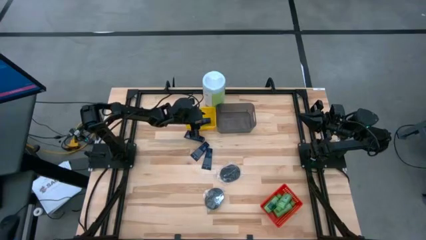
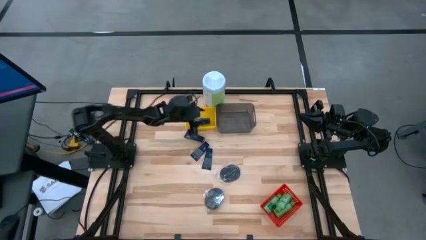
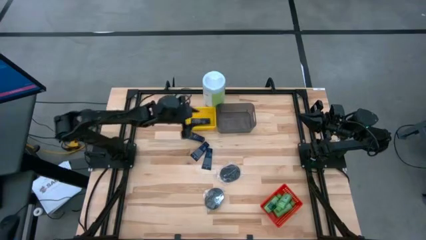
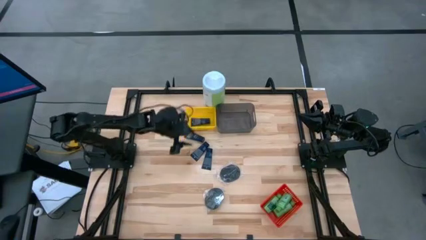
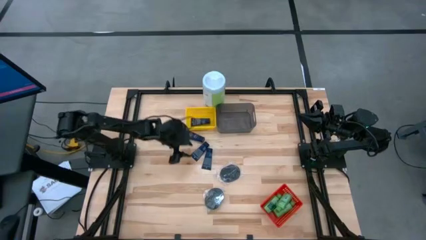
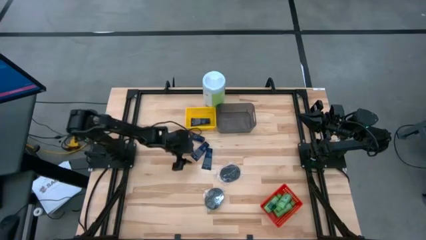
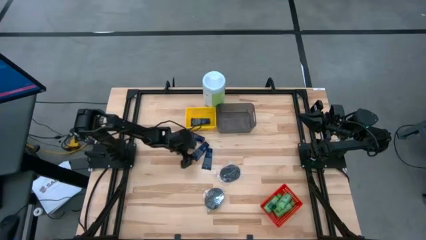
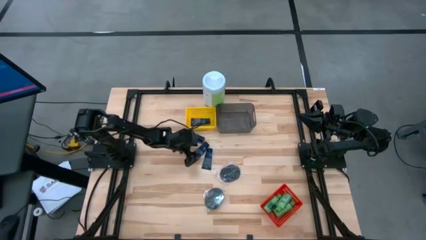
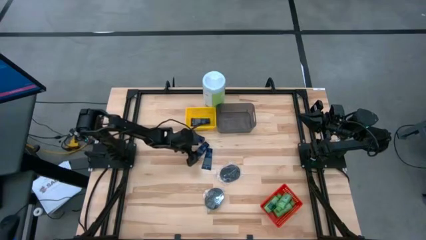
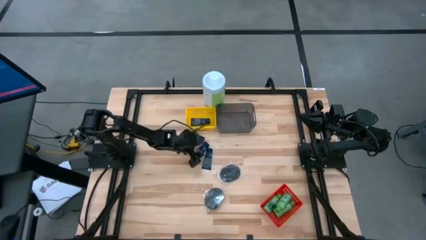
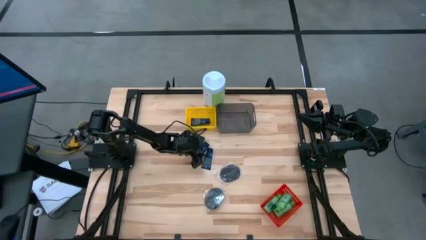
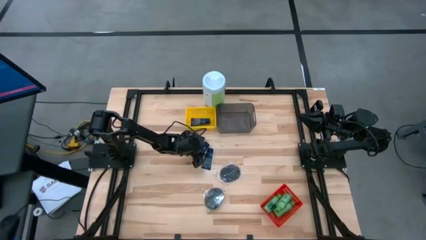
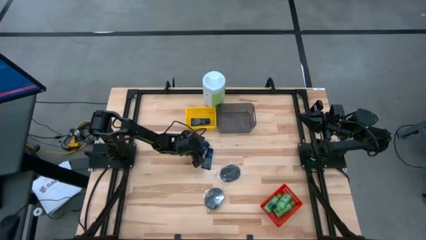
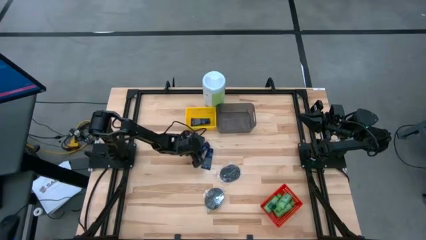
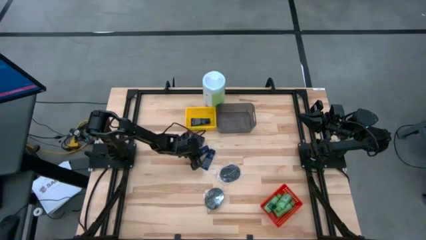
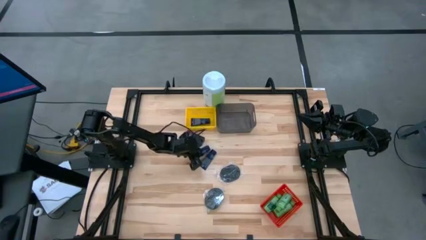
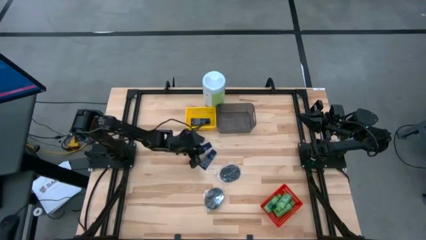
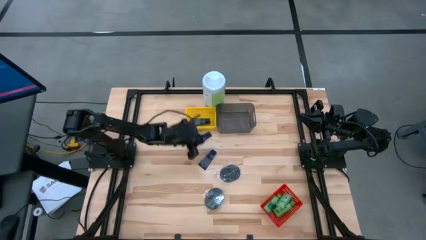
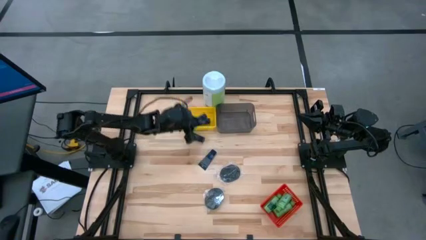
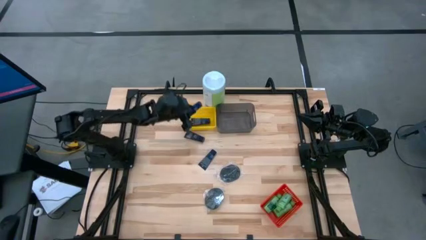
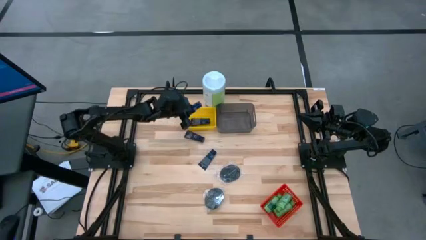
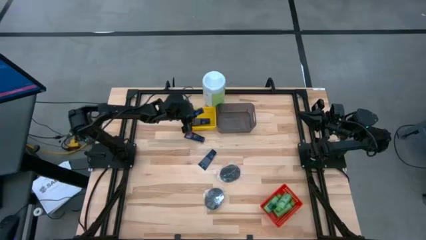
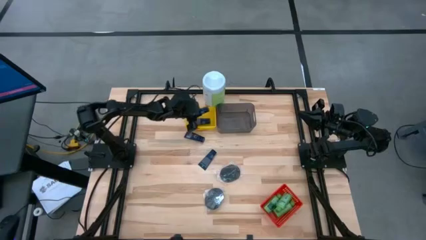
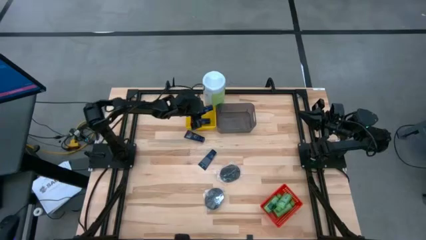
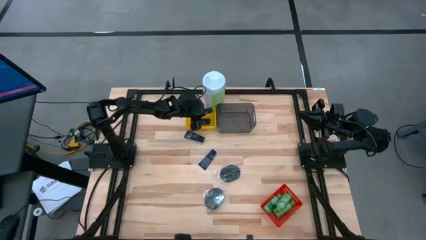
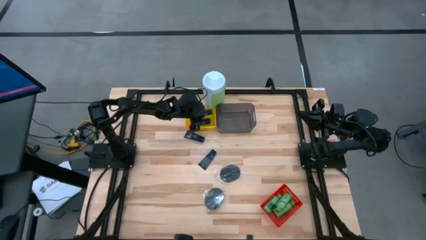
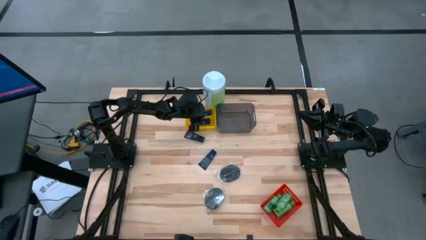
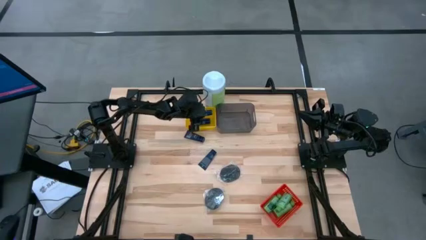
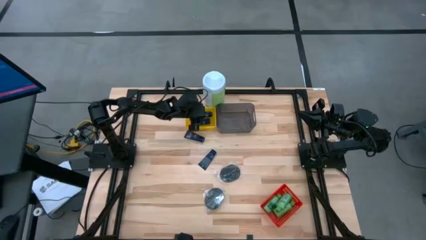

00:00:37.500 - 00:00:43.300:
Task: Pick & Place Travel size toiletries
Put the dark blue shaving cream into the yellow basket

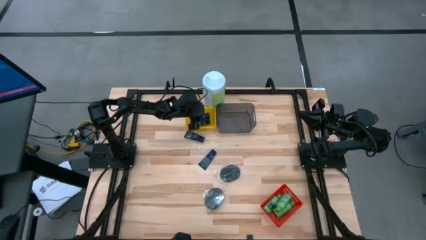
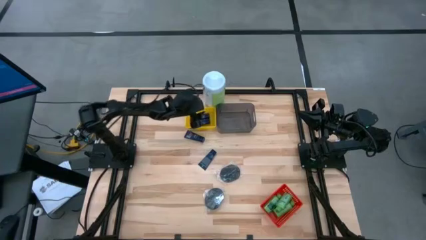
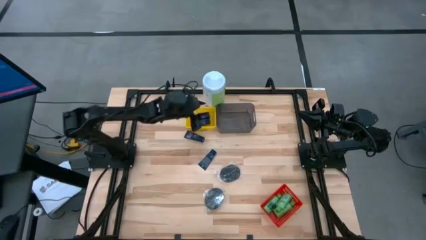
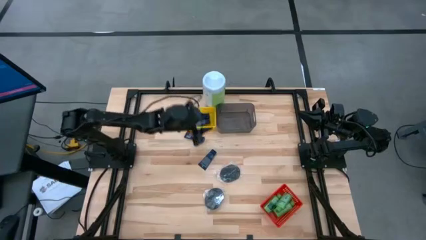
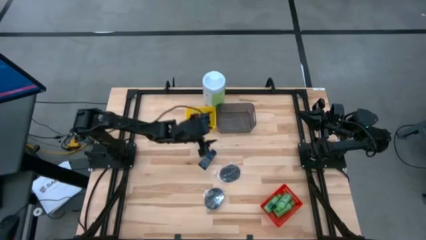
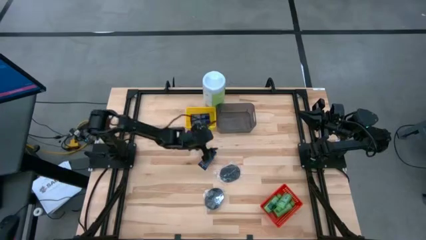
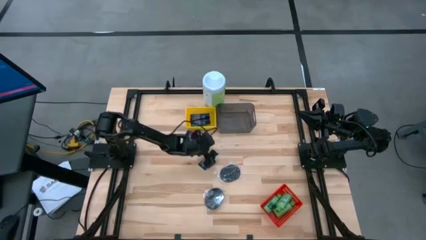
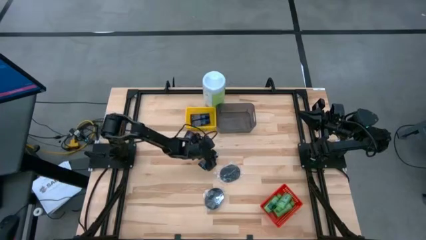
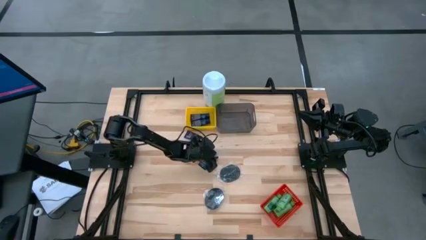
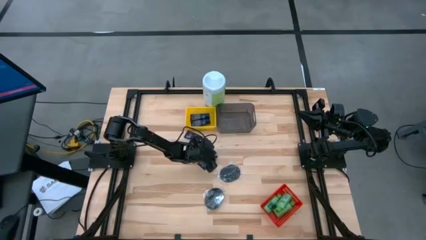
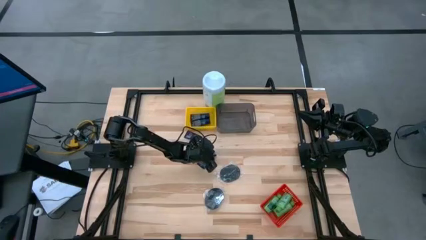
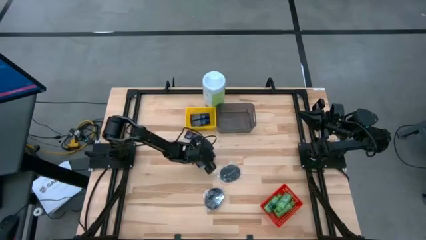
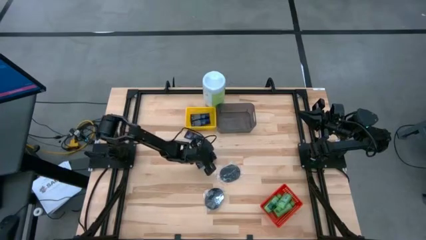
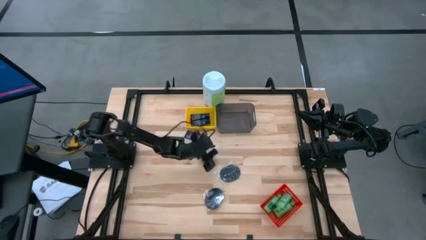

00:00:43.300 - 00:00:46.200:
Put the dark blue shaving cream into the yellow basket

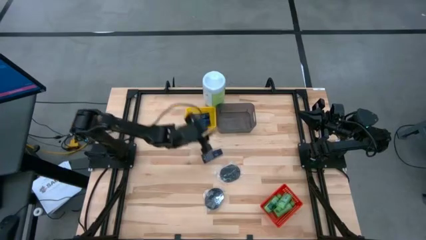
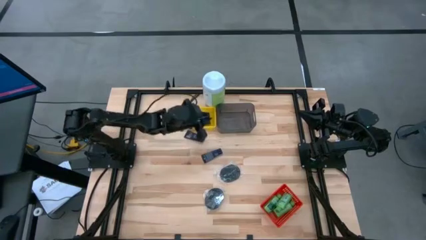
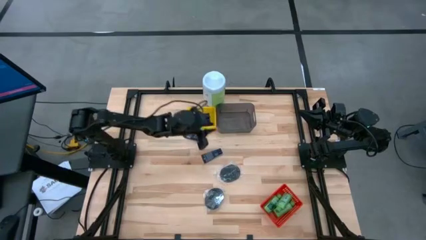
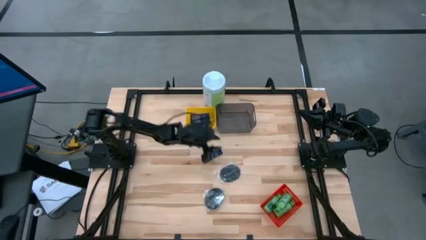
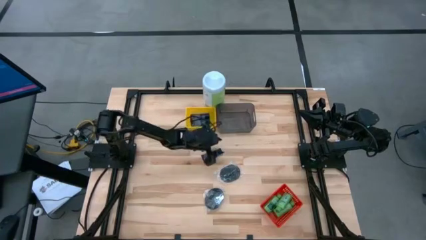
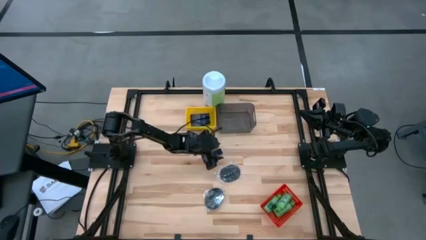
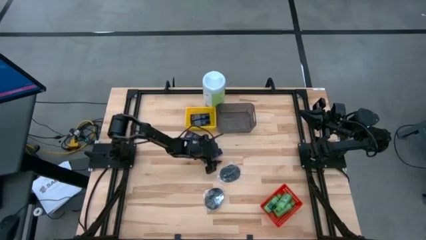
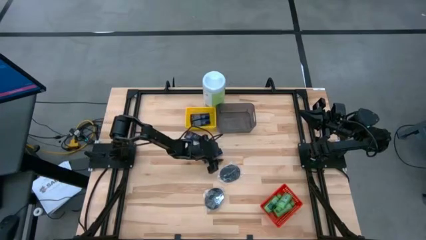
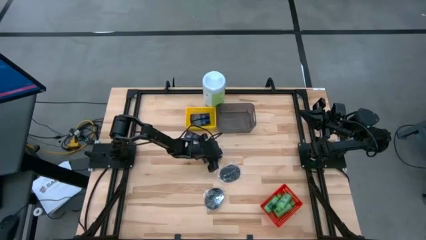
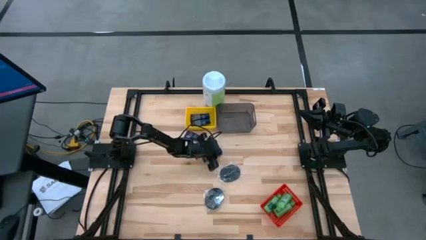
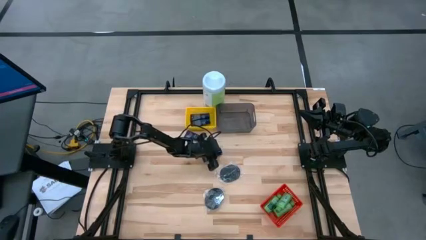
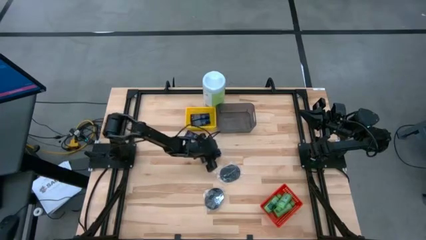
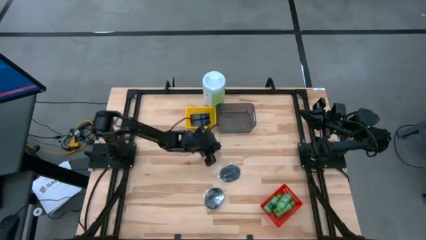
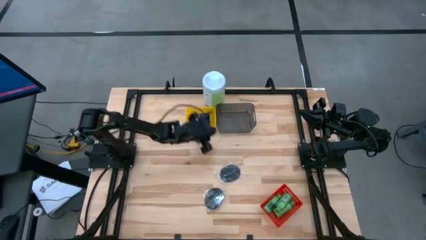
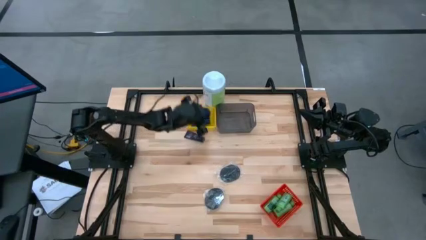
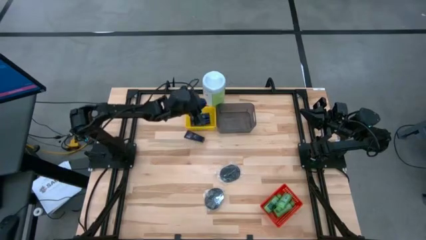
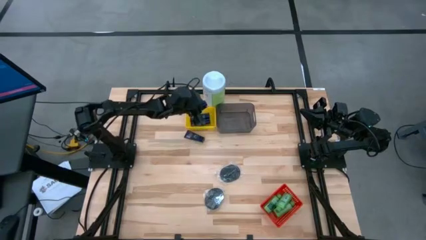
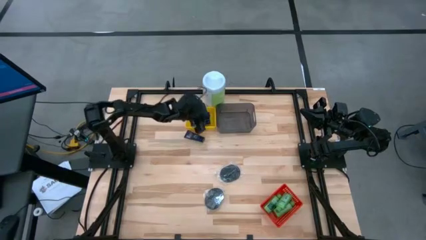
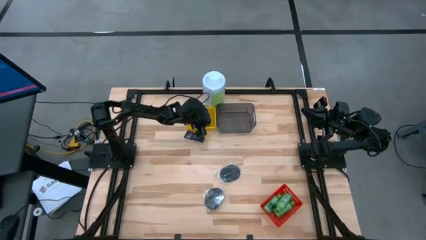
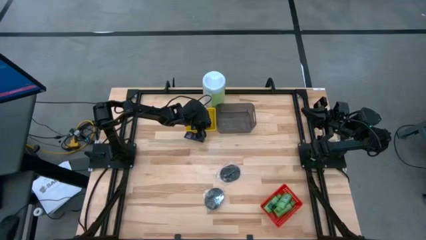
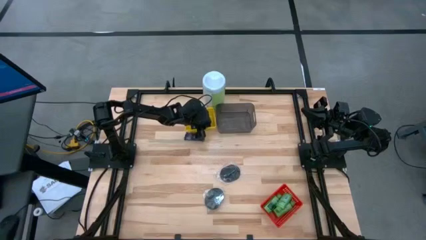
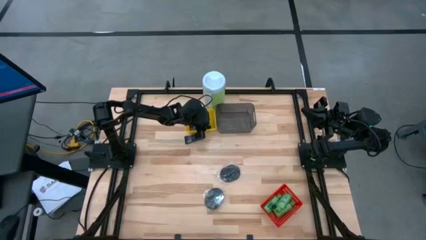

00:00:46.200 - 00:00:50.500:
Put the dark blue shaving cream into the yellow basket

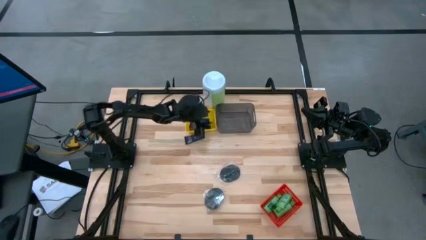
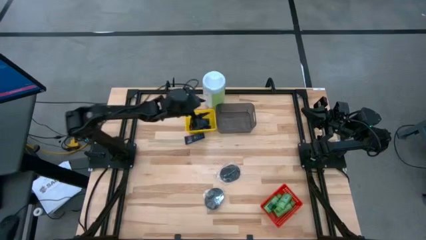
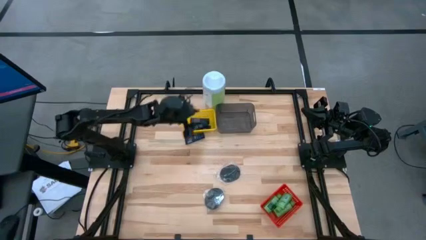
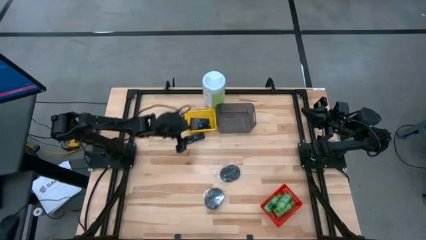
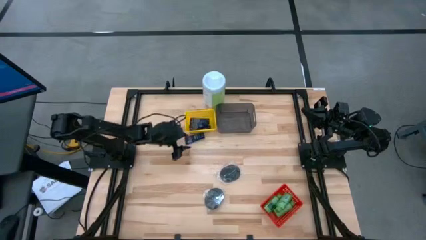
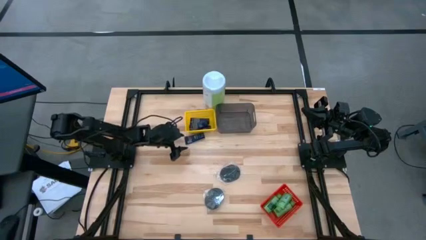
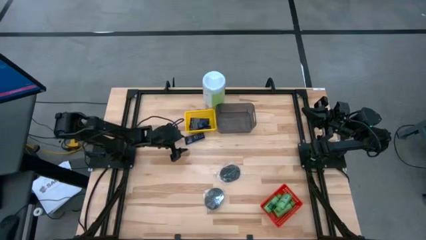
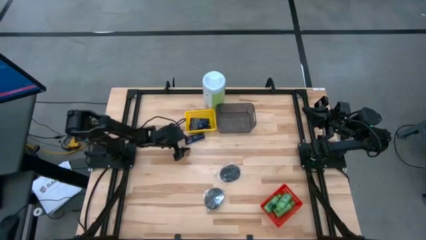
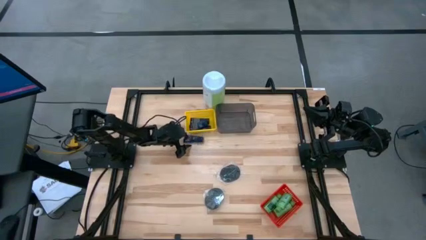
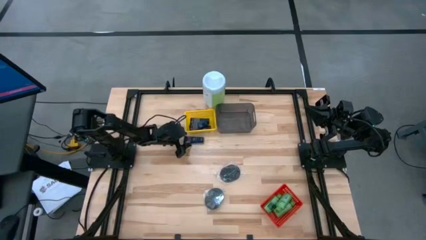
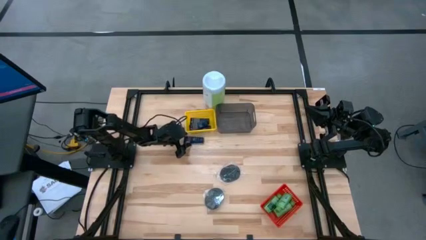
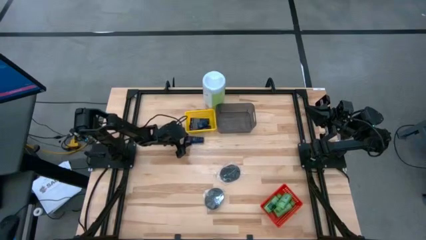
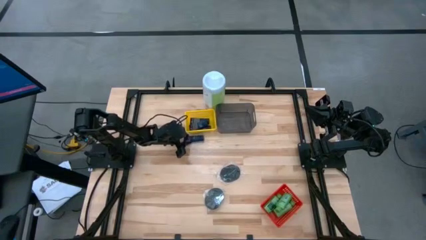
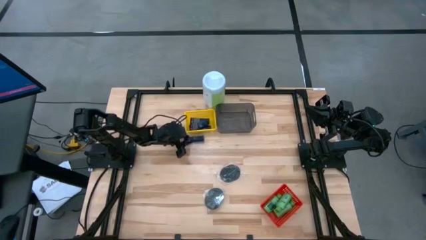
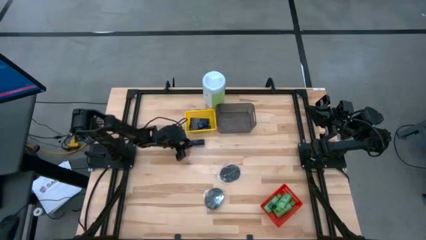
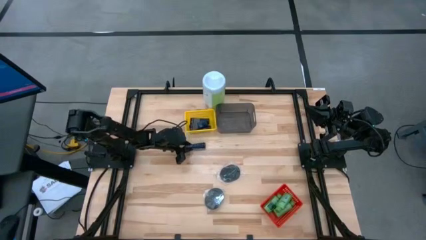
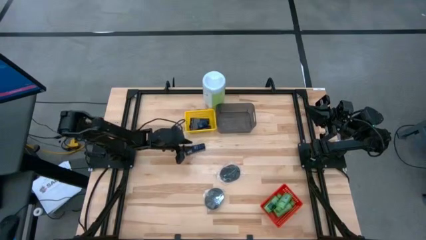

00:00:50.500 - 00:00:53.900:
Put the dark blue shaving cream into the yellow basket

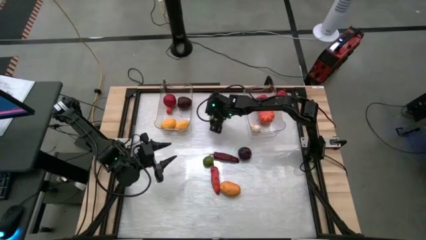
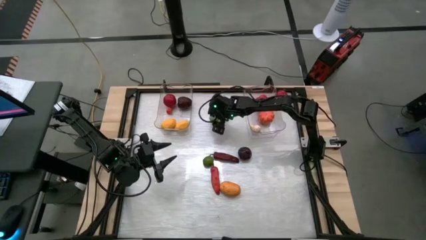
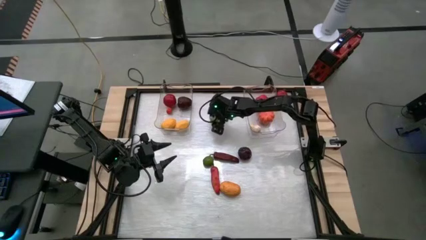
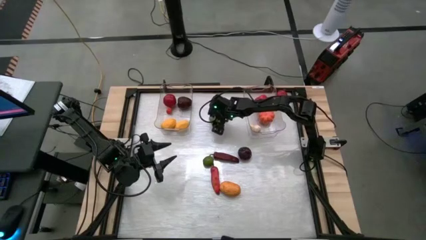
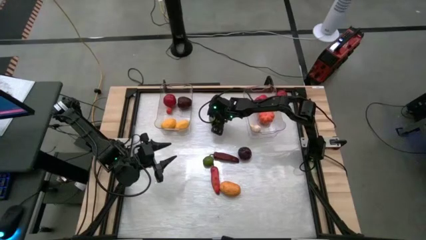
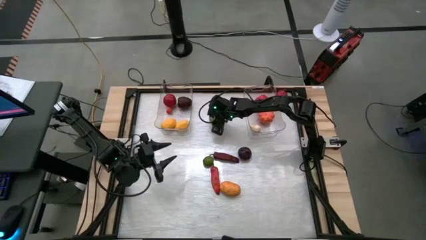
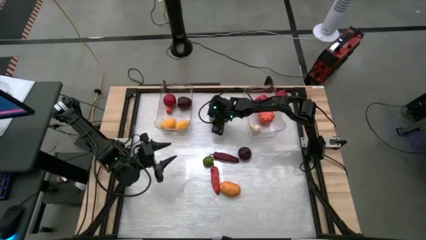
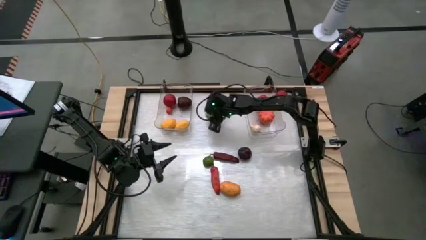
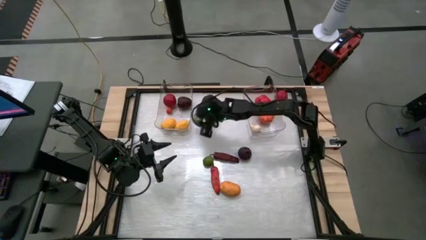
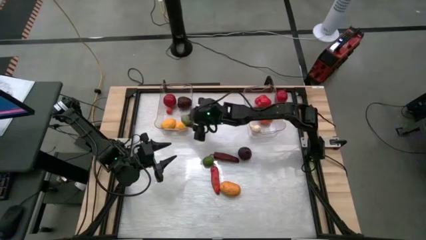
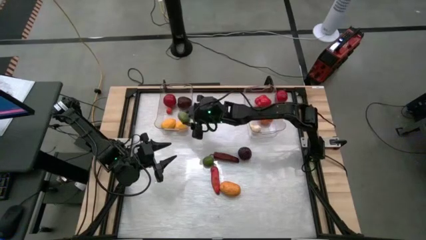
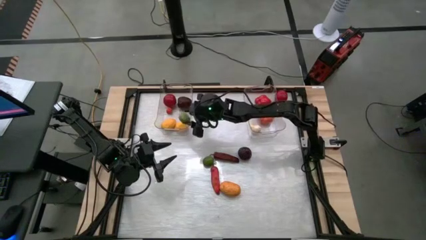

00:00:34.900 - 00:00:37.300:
Task: Sort produce into baskets
Put the top lime into the left transparent bin
